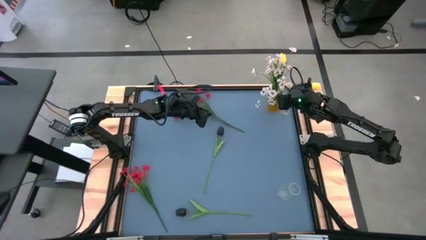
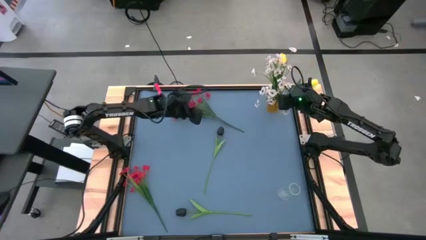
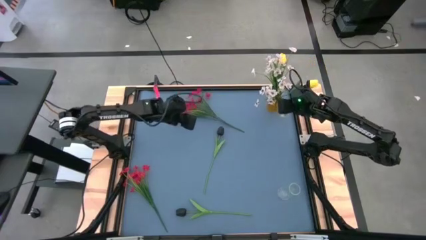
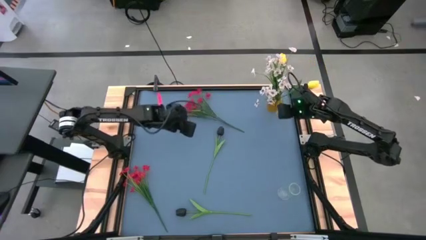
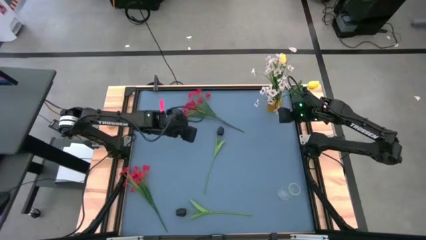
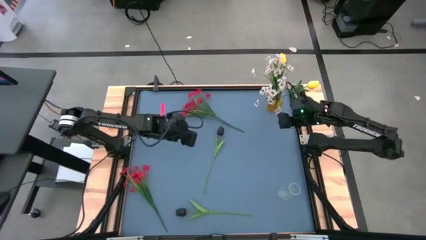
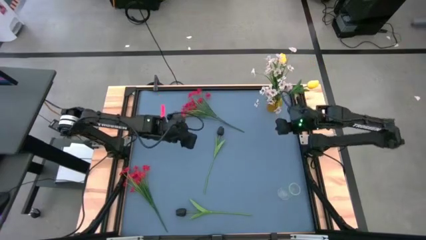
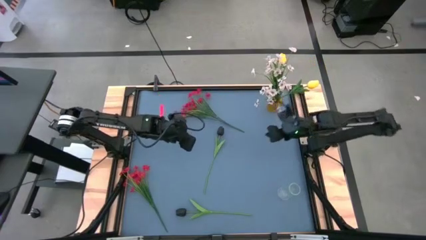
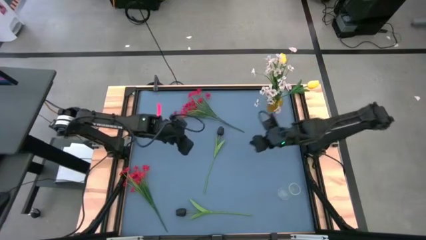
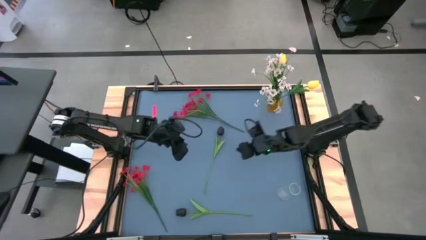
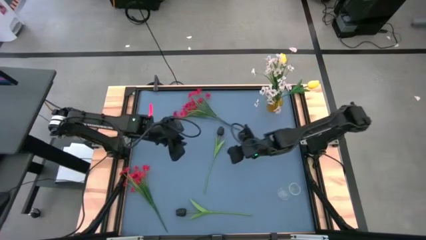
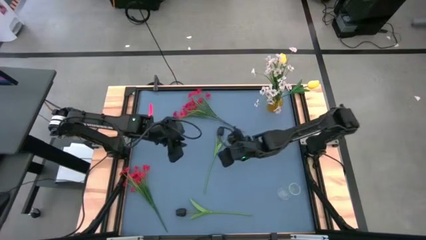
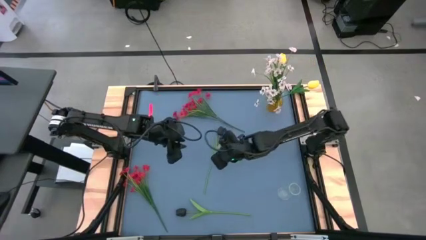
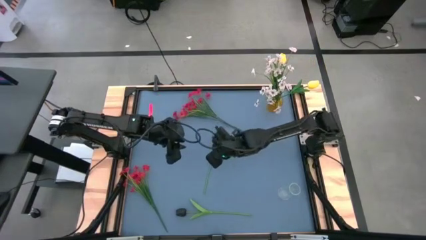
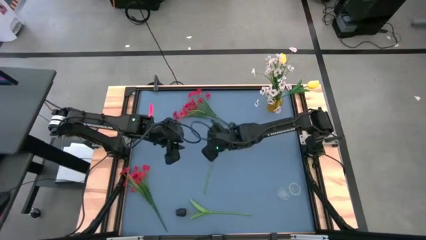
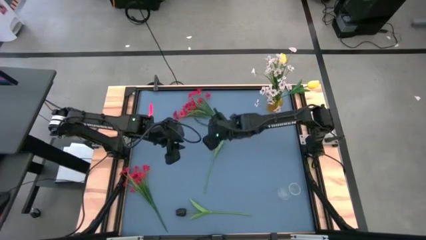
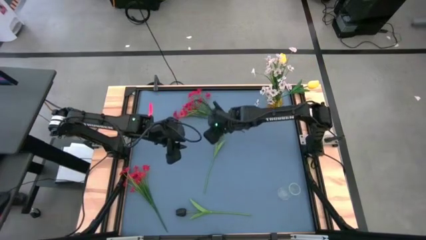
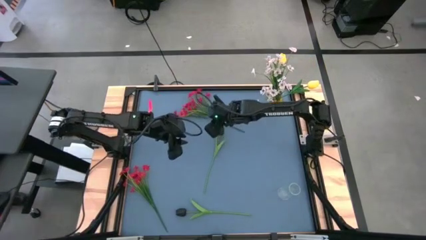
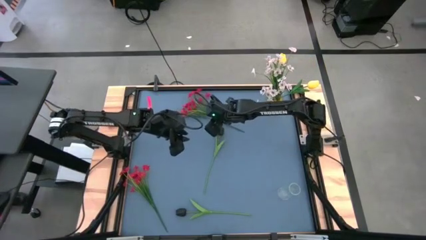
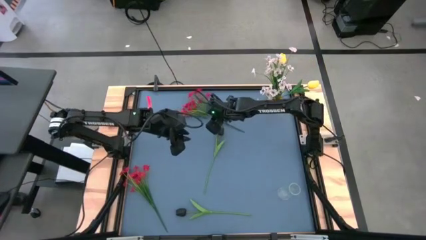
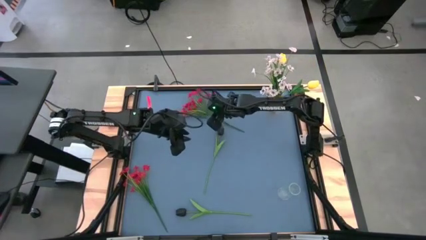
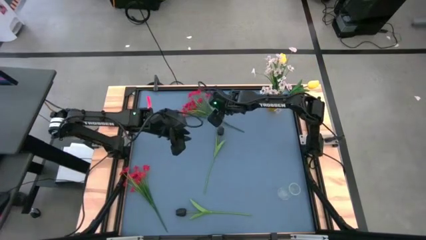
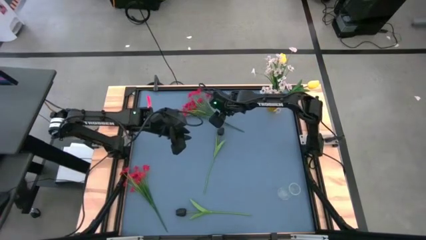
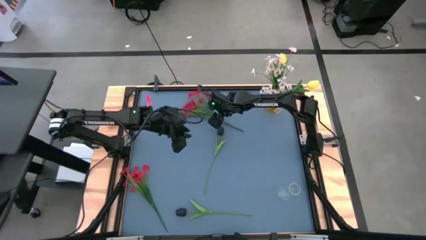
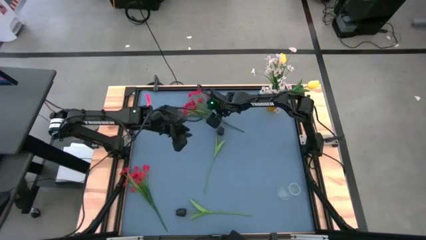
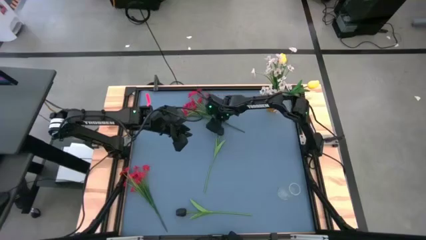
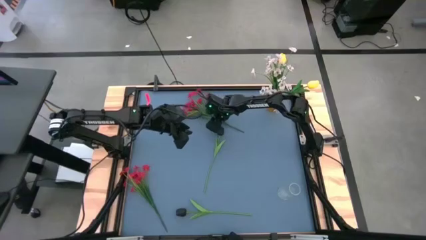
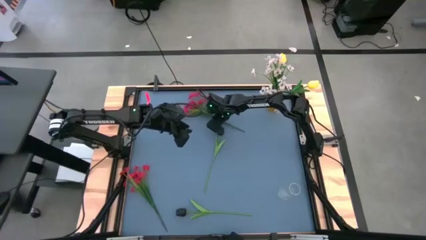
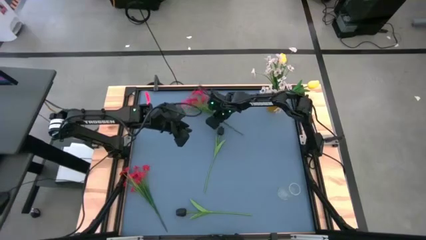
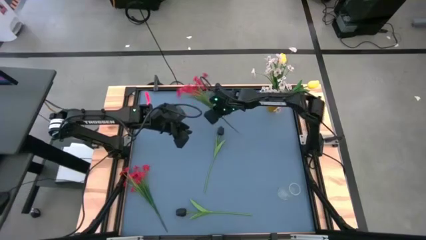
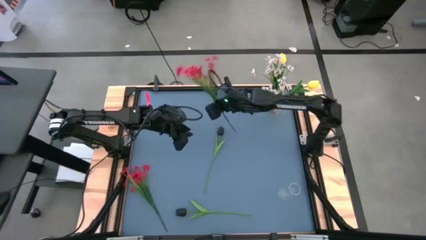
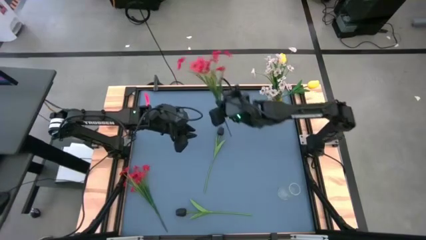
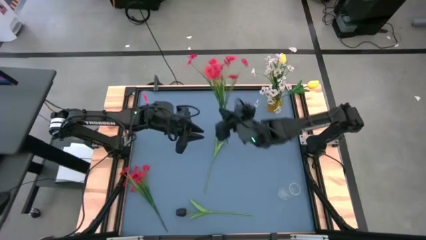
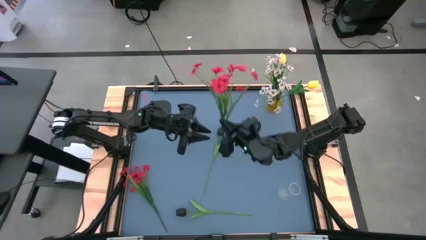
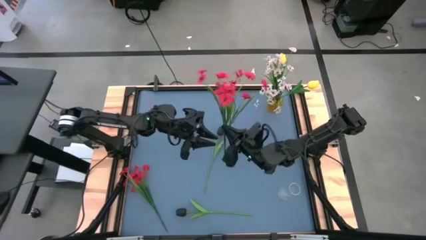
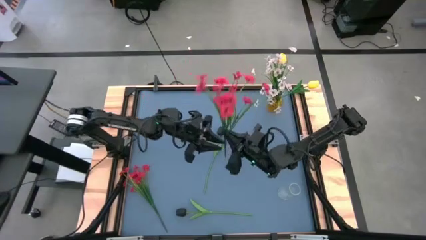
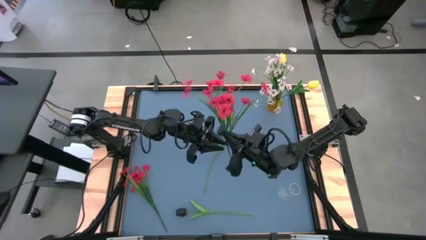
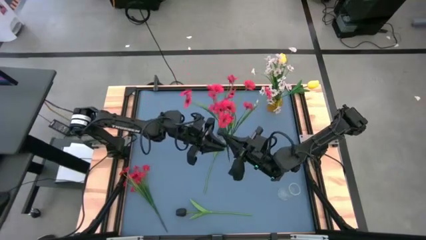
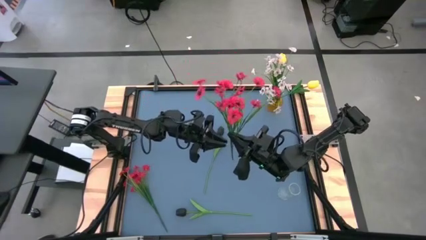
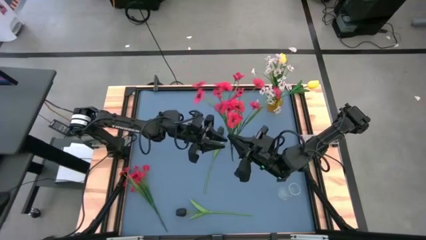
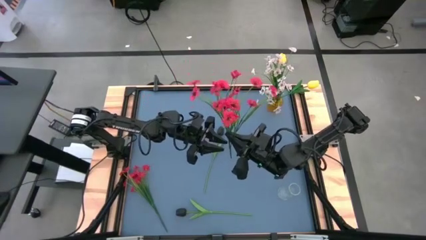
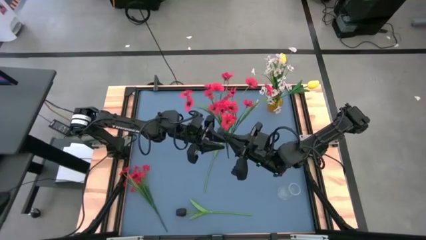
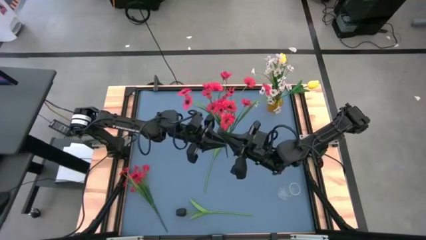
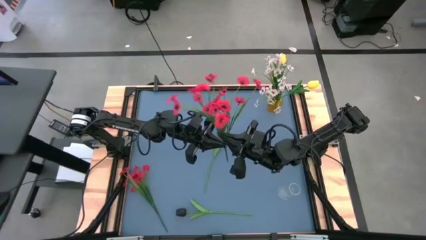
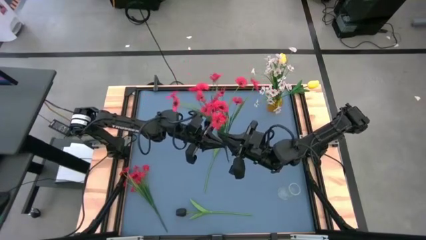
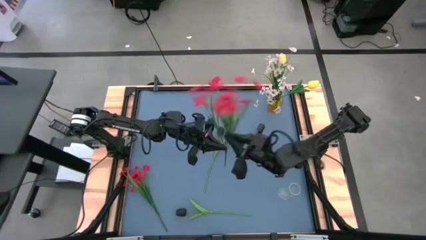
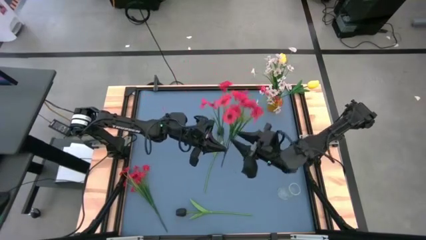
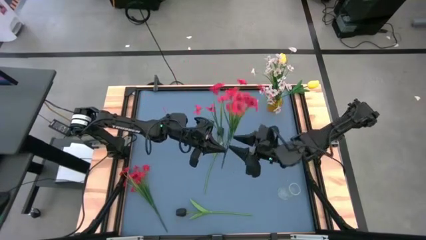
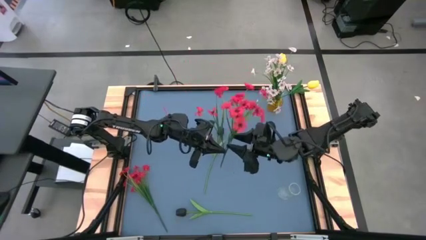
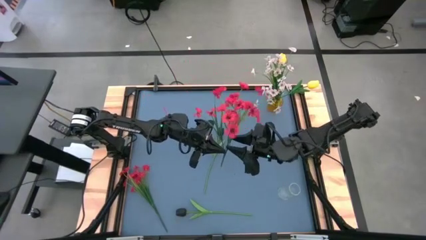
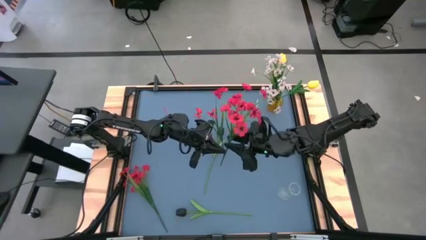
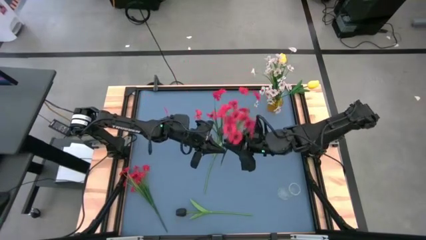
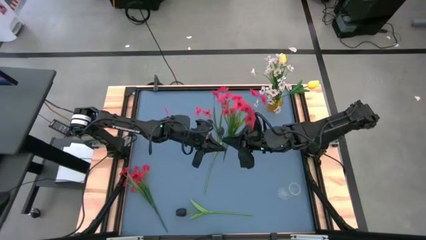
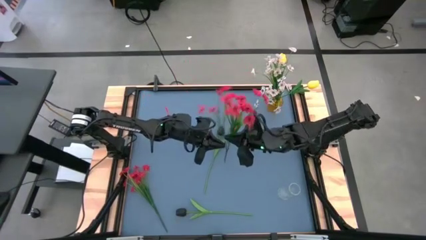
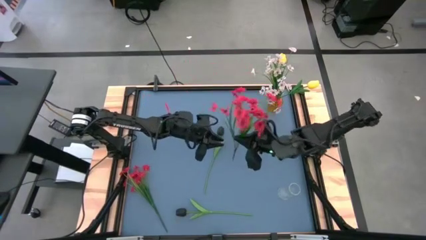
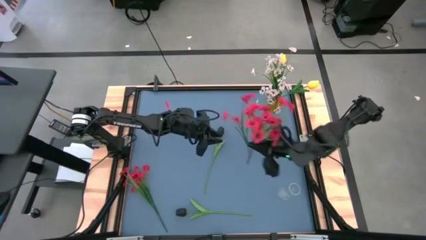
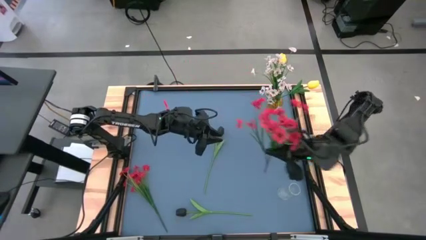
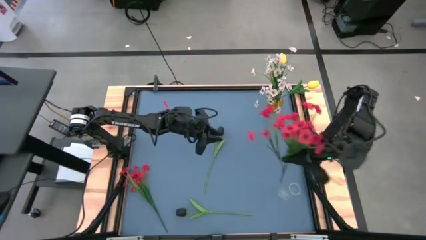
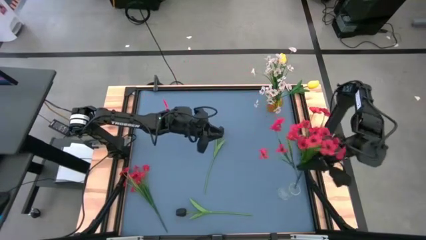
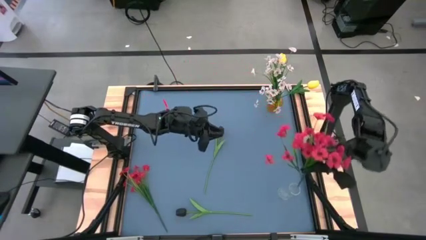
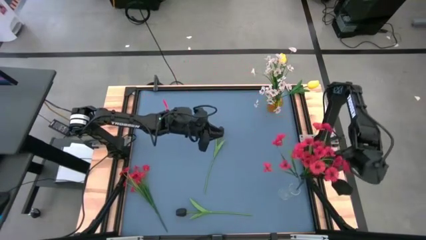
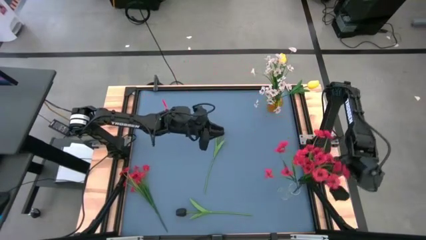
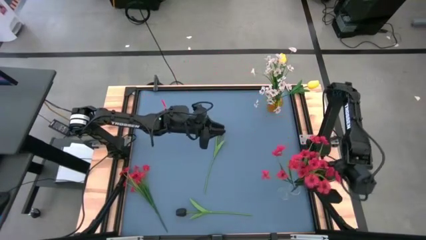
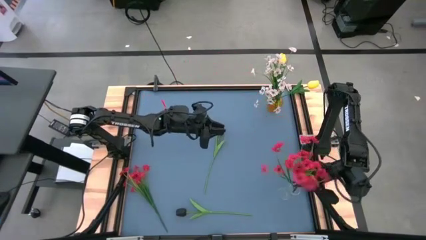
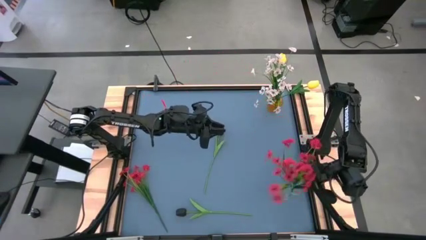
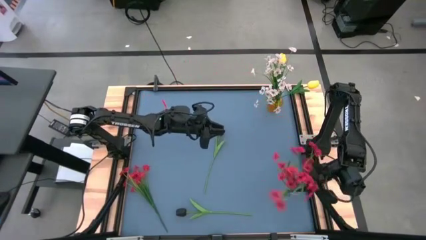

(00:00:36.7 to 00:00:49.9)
Task: Sort flowers into vase by color
Put the top red flowers into the transparent vase
